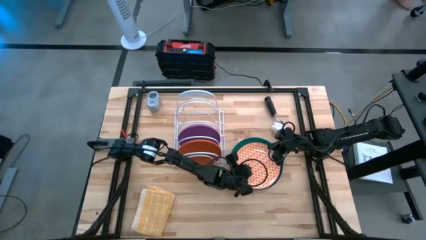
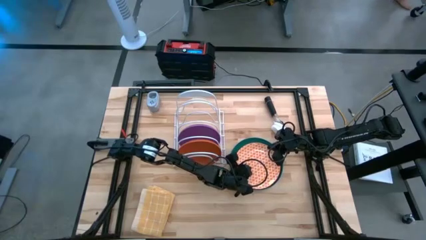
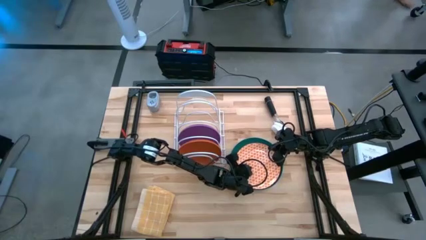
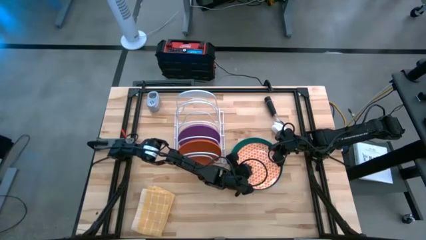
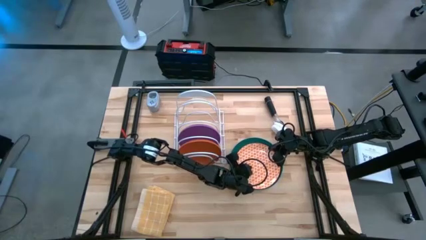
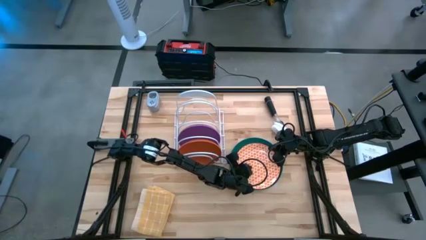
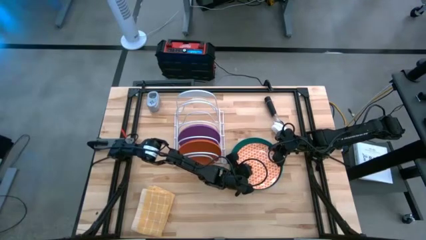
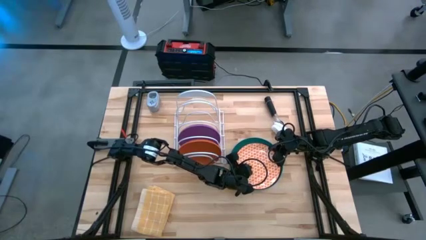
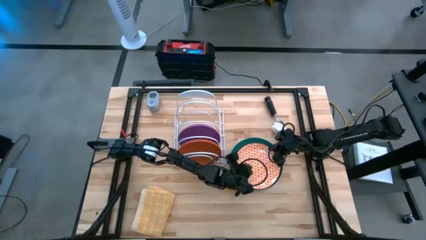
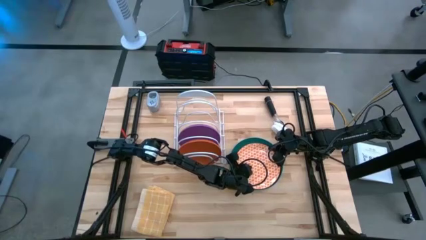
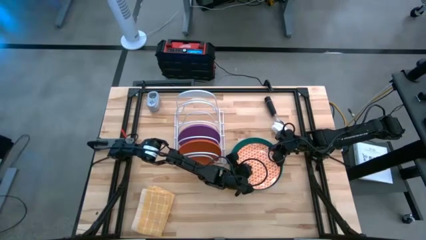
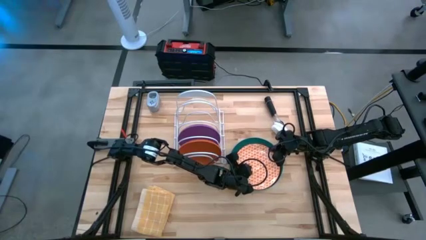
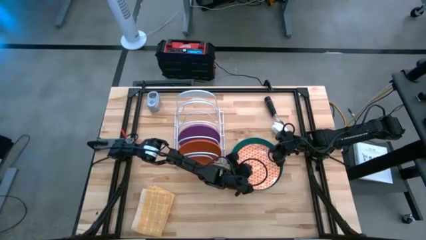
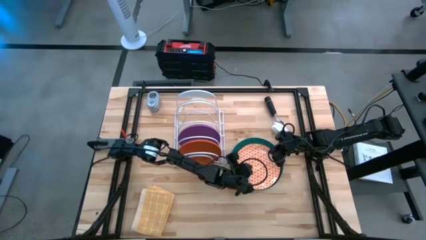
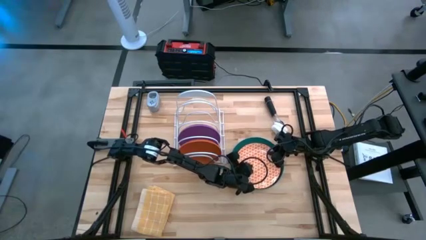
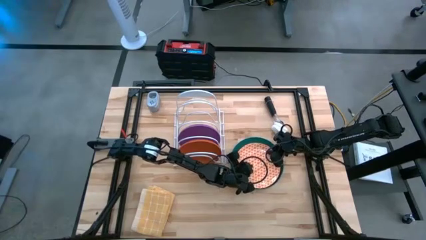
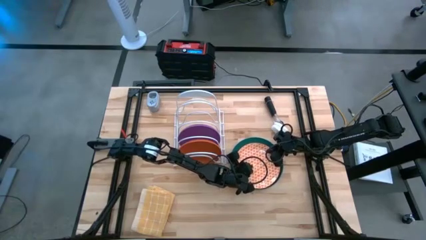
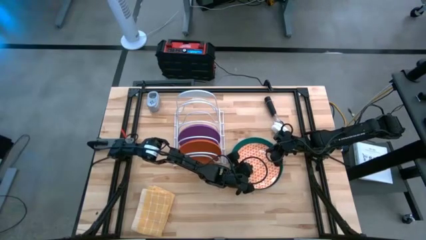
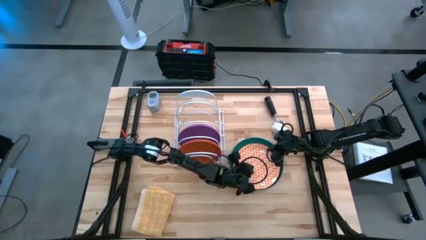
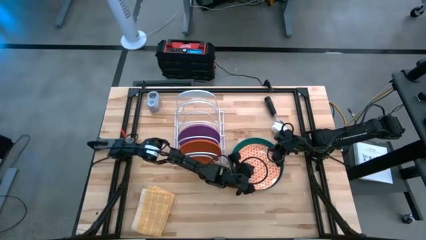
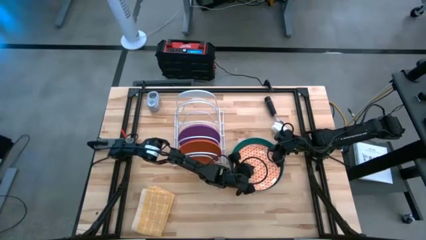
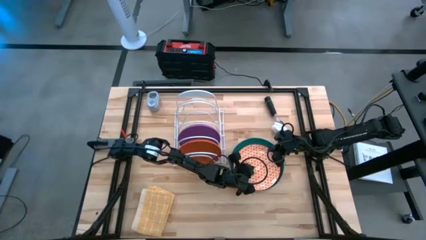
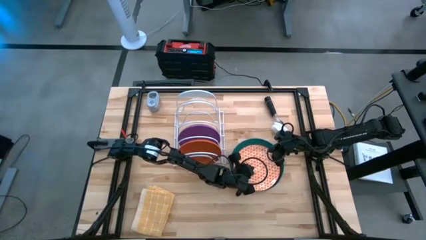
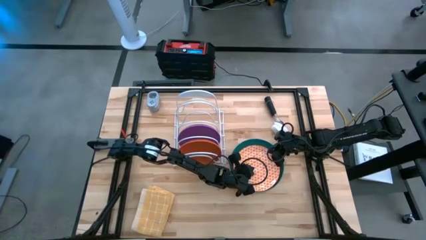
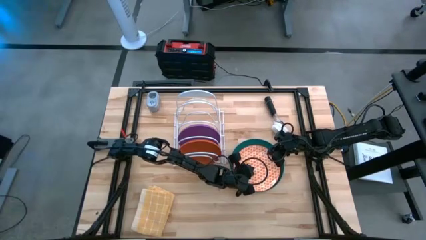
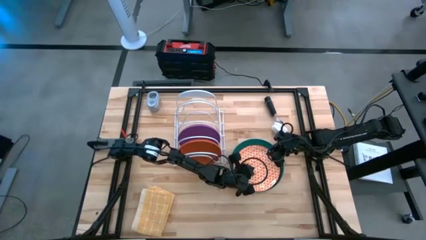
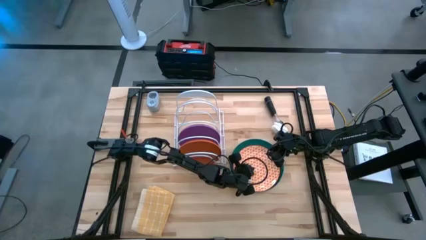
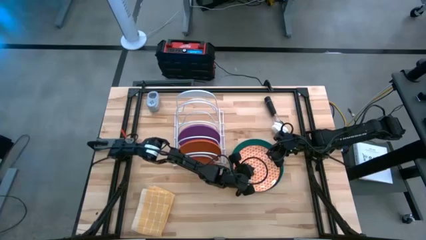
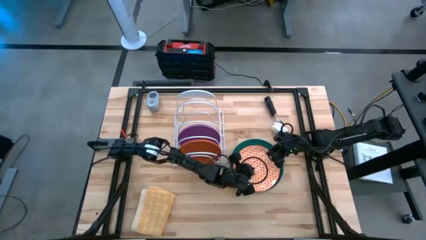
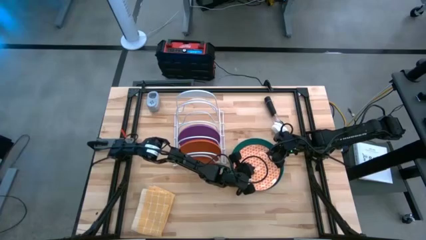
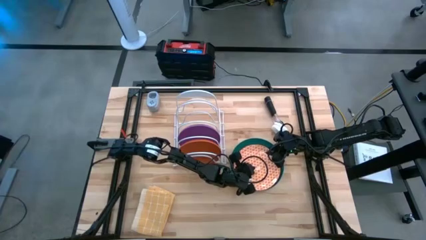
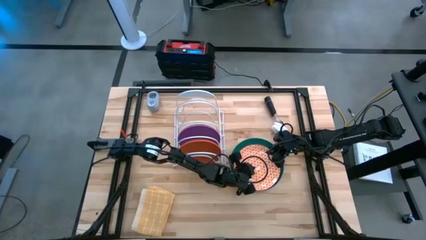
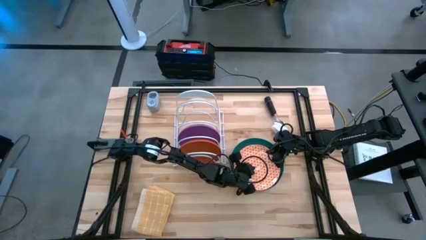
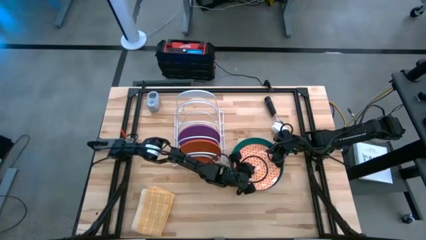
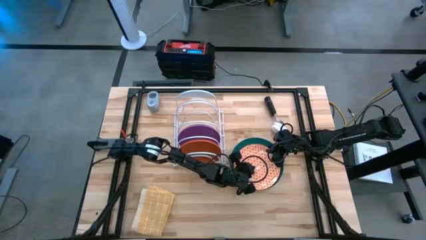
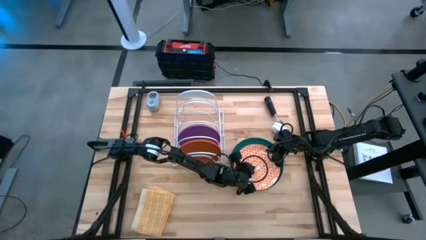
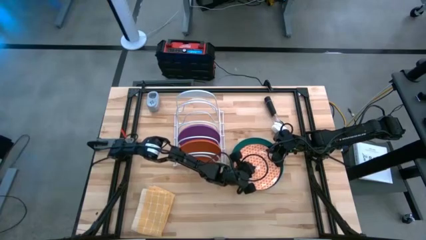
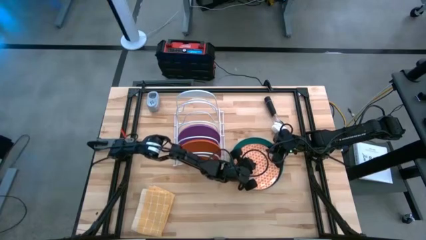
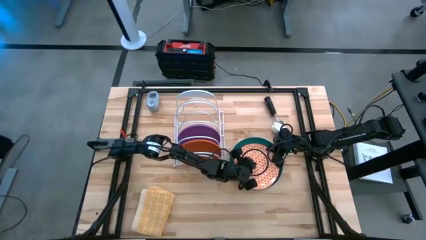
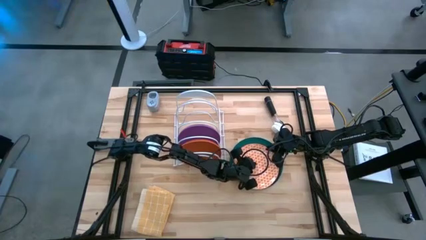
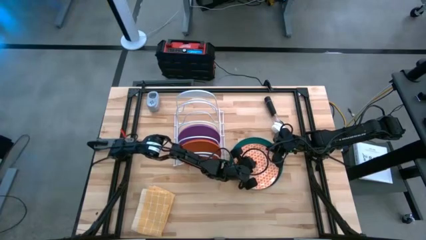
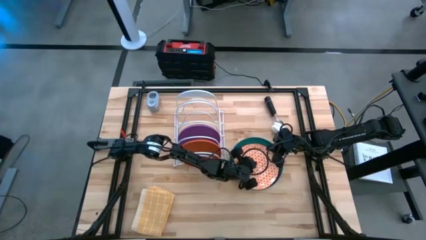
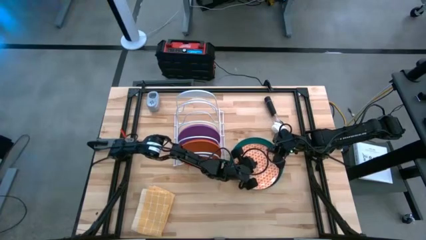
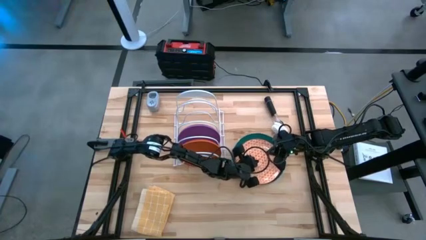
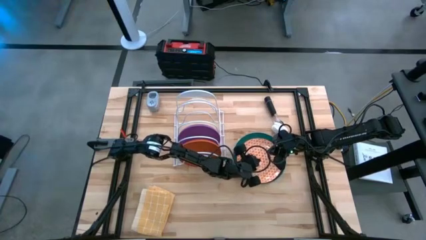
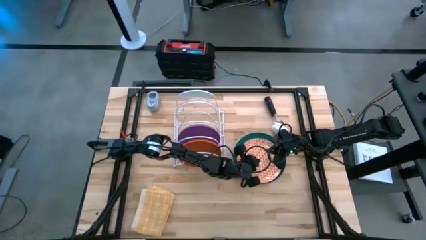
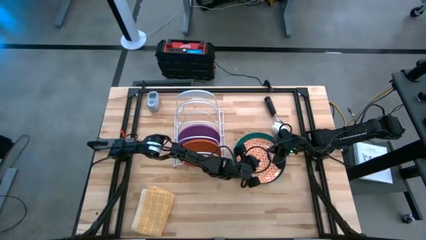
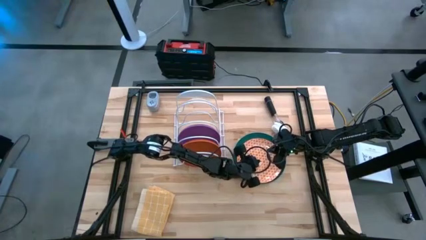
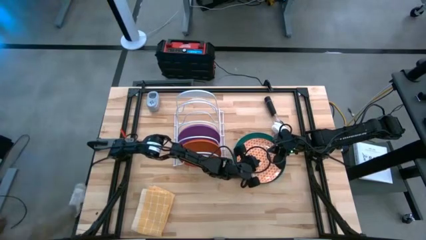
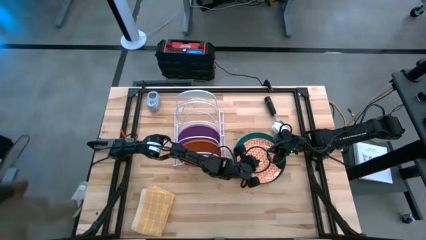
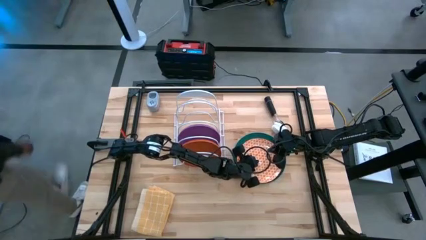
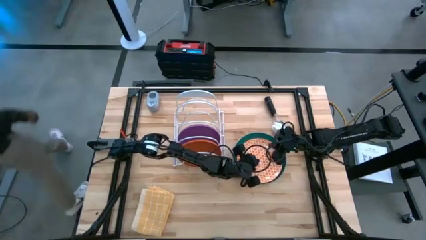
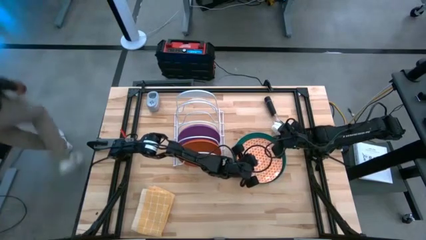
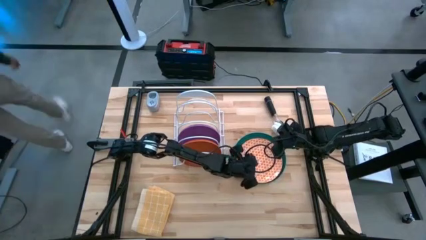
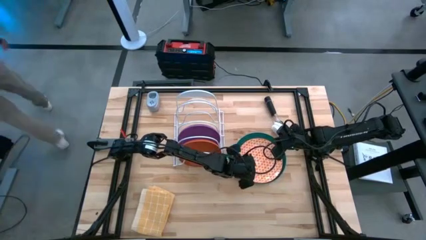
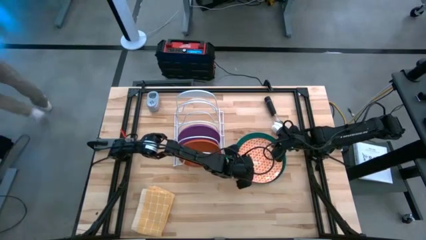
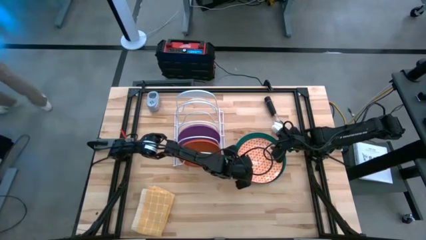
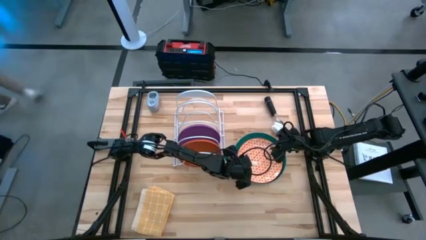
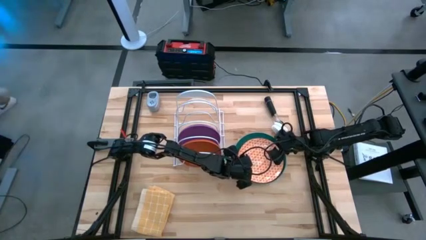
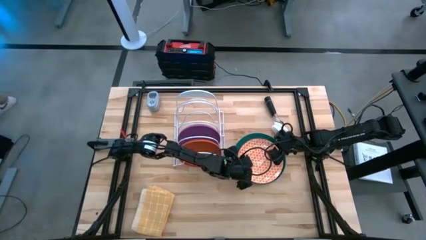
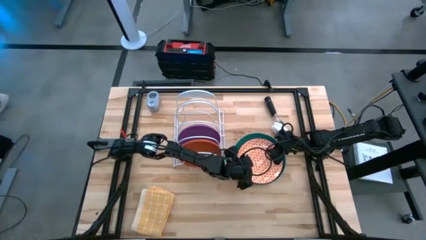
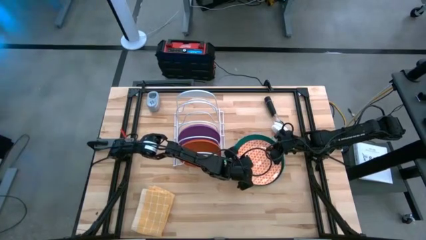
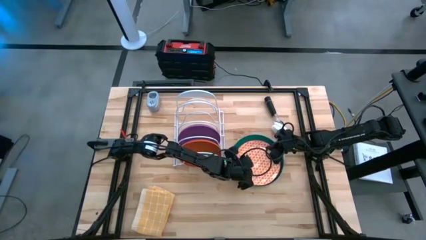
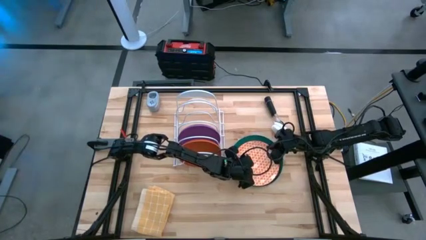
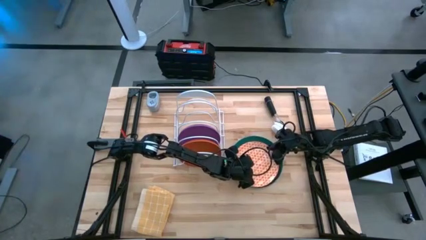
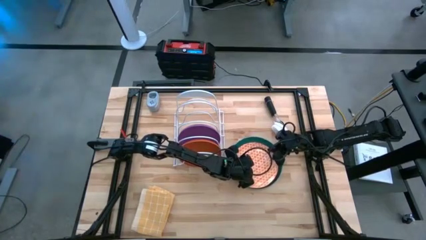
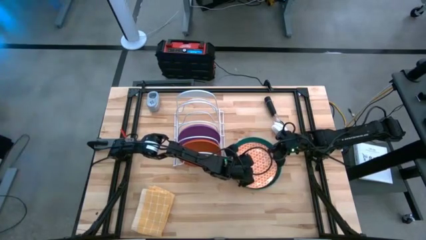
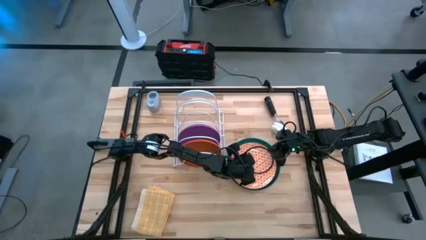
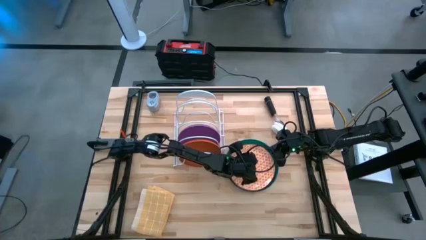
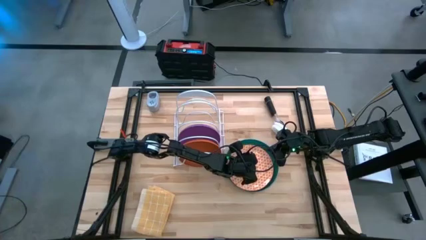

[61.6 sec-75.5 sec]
Task: Sort dishes
Put the orange/white plate into the dish rack

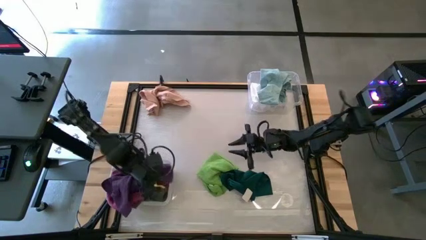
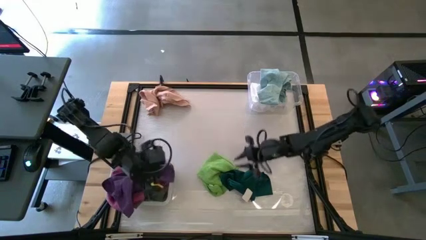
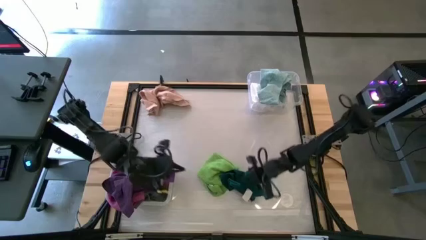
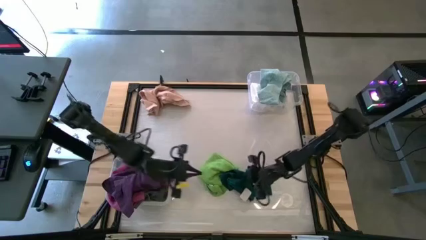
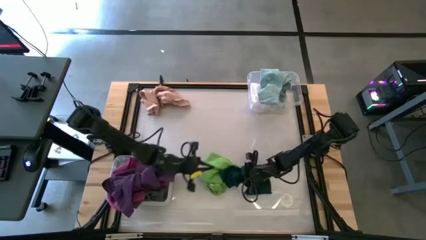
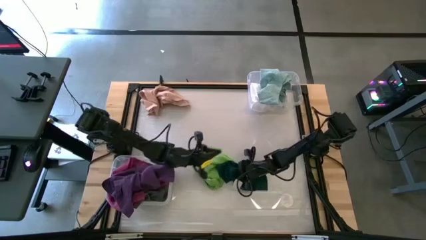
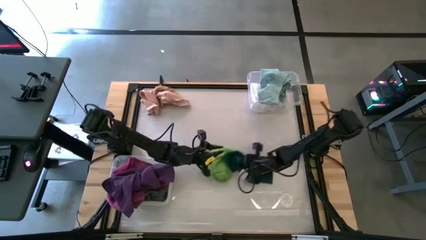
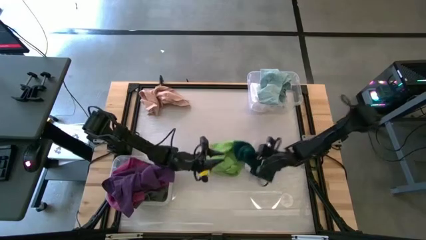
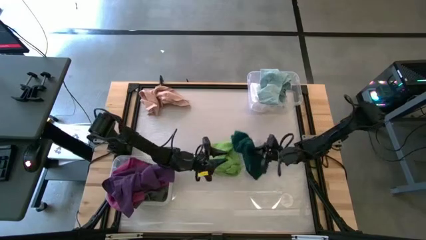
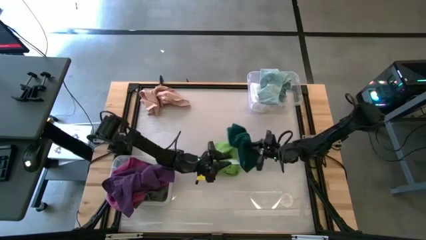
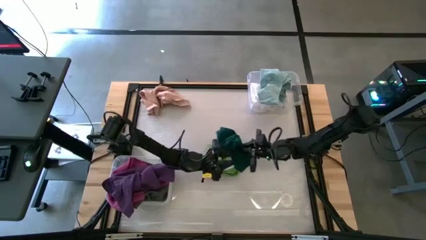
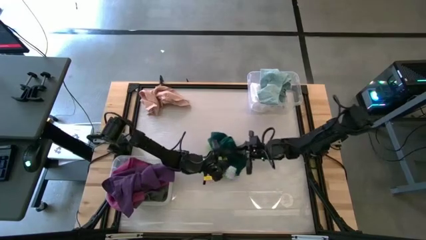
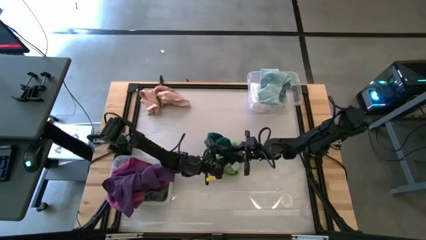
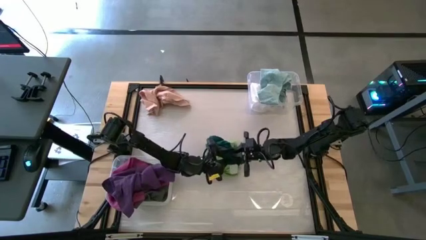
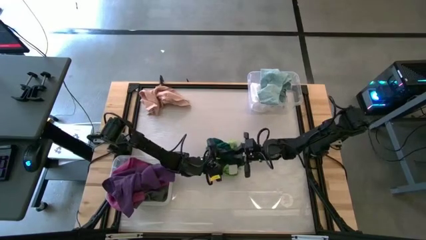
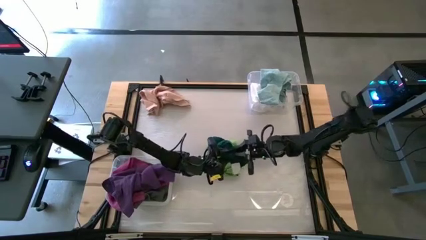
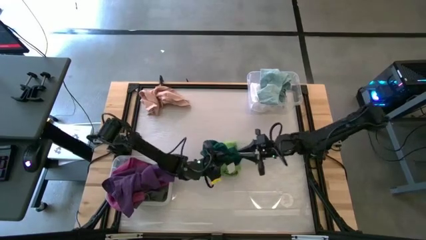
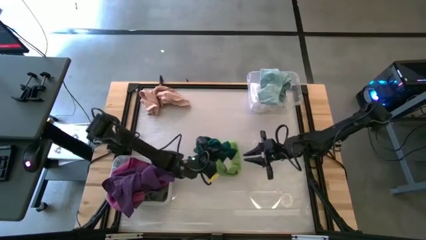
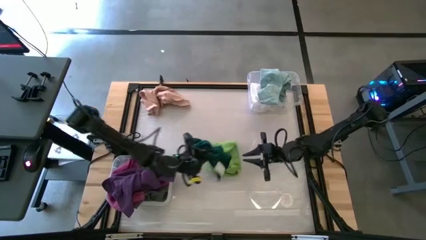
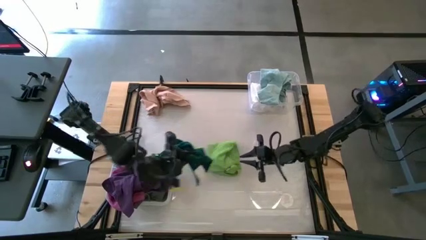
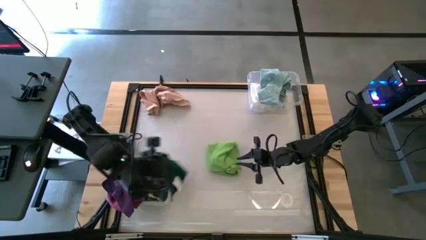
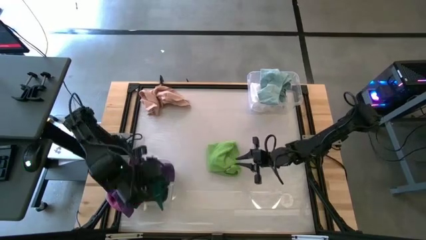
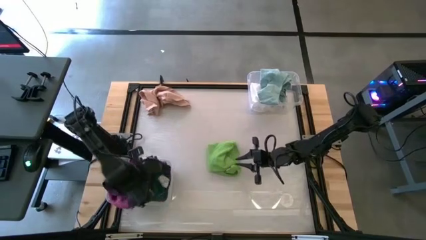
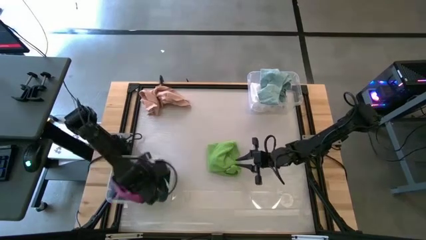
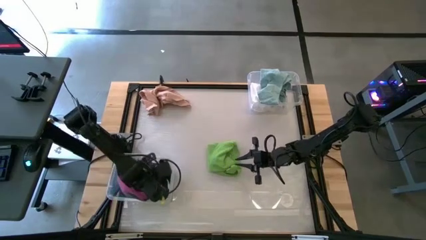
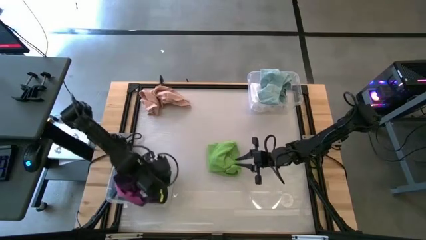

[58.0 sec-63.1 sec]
Task: Sort towels by color in basket
Put the dark green towel into the bottom transparent bin
